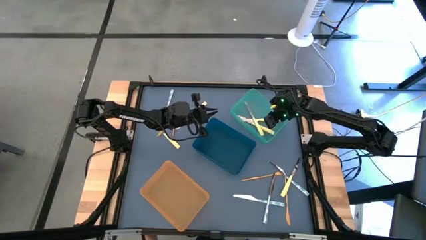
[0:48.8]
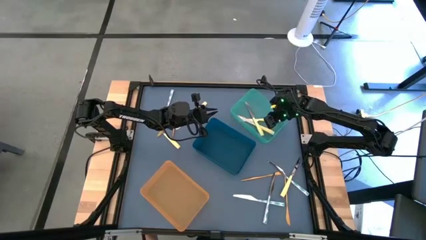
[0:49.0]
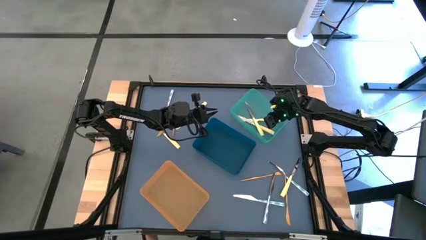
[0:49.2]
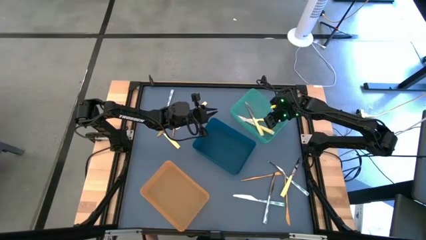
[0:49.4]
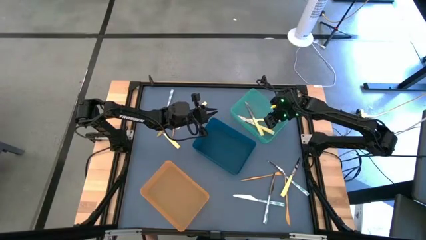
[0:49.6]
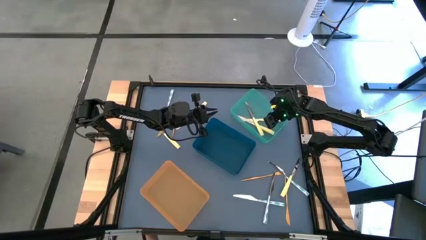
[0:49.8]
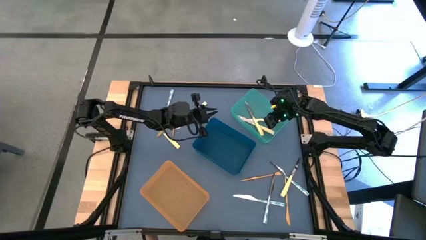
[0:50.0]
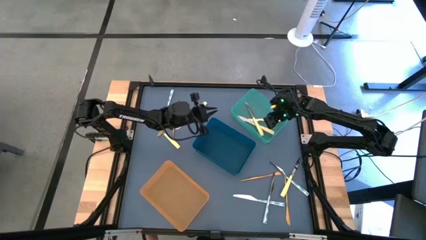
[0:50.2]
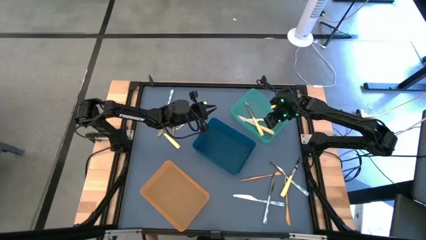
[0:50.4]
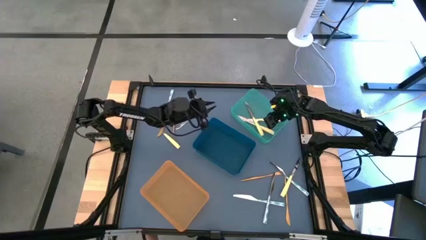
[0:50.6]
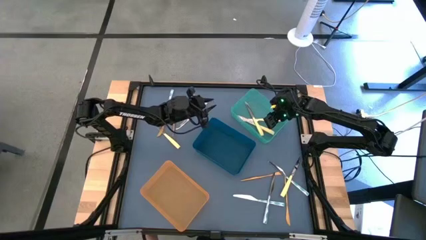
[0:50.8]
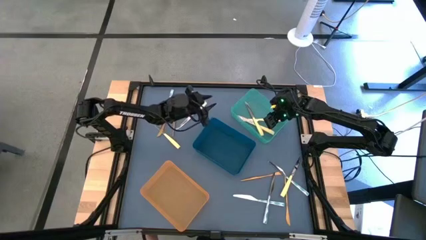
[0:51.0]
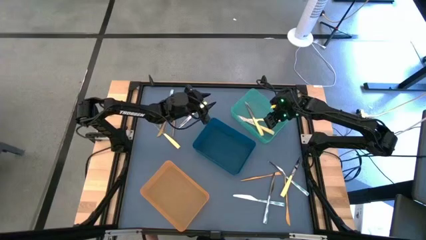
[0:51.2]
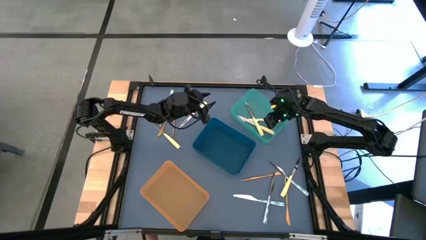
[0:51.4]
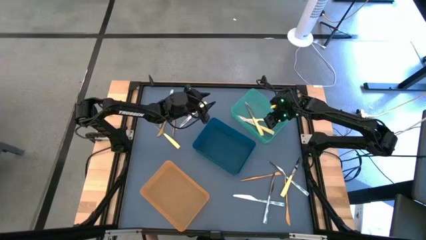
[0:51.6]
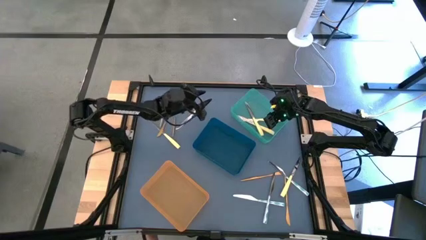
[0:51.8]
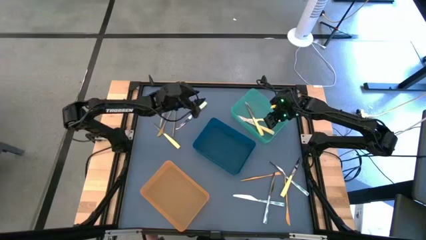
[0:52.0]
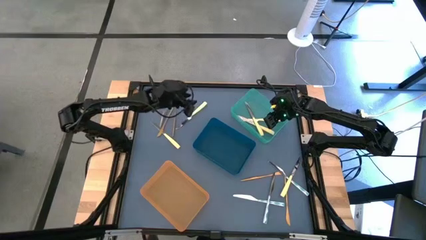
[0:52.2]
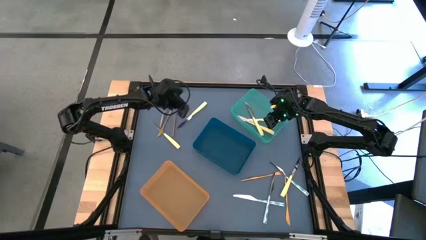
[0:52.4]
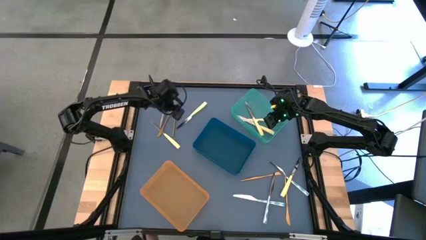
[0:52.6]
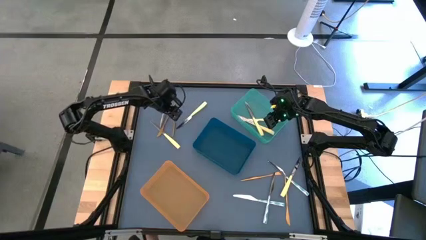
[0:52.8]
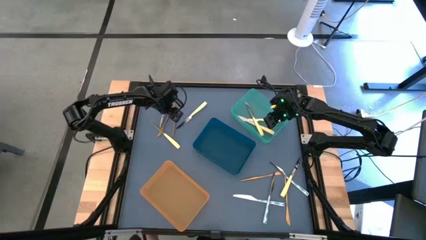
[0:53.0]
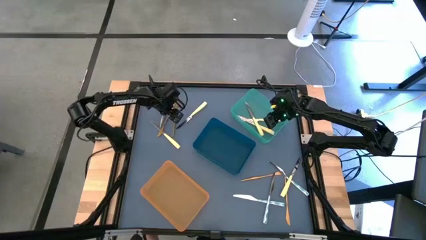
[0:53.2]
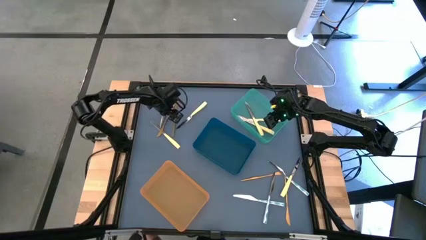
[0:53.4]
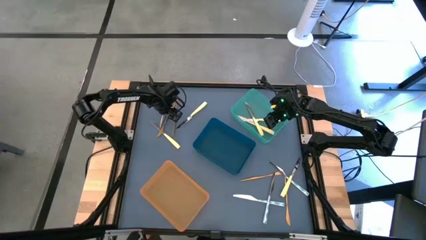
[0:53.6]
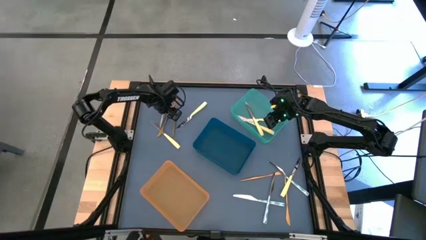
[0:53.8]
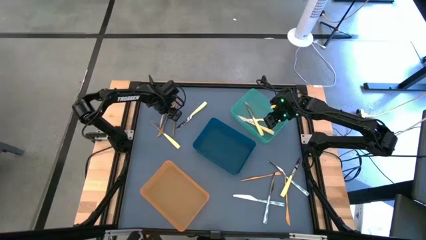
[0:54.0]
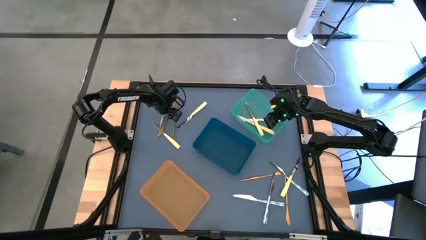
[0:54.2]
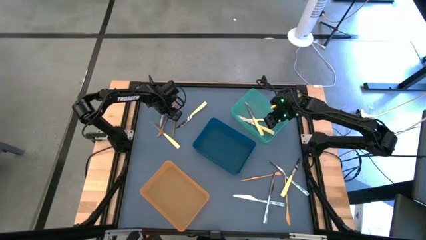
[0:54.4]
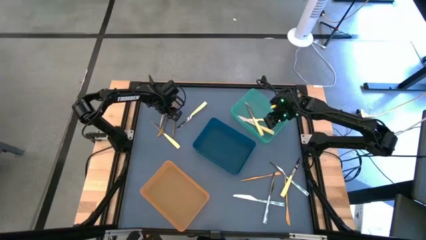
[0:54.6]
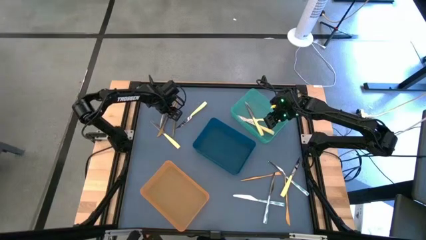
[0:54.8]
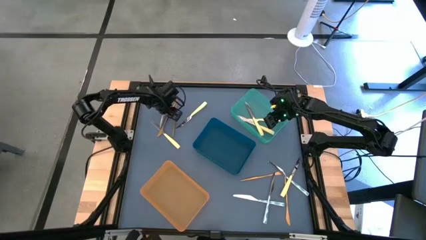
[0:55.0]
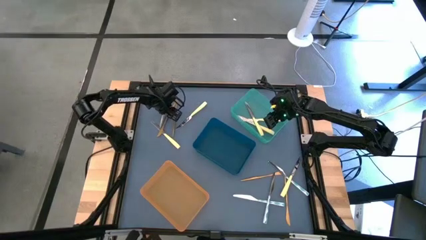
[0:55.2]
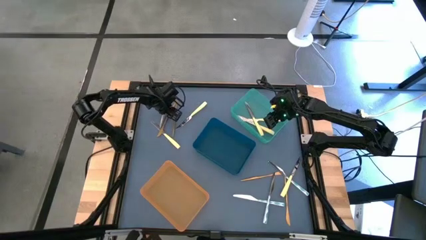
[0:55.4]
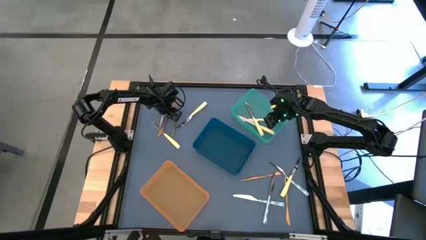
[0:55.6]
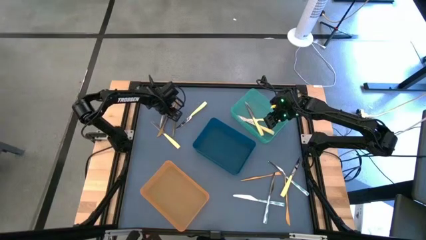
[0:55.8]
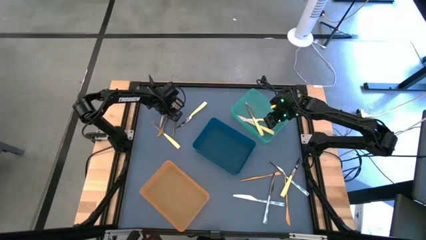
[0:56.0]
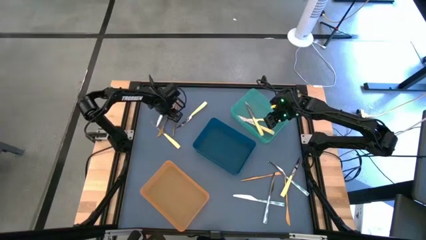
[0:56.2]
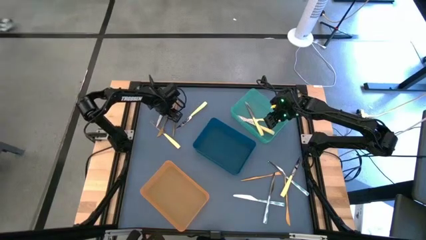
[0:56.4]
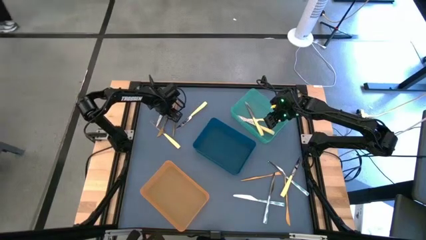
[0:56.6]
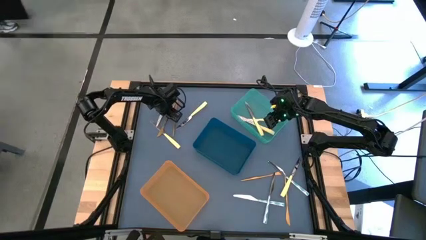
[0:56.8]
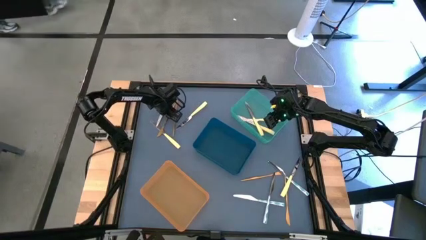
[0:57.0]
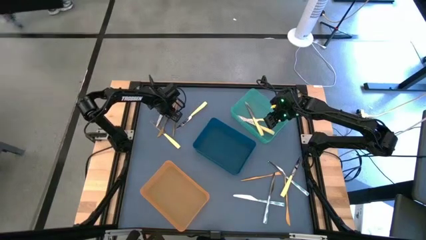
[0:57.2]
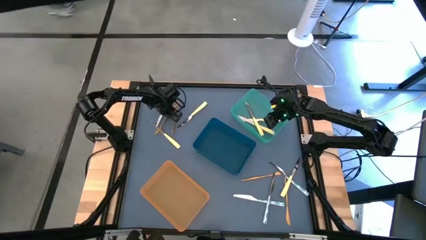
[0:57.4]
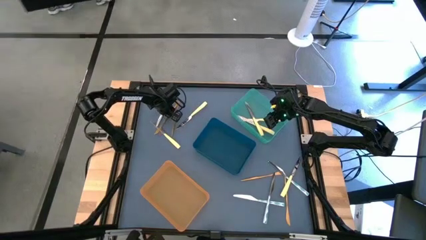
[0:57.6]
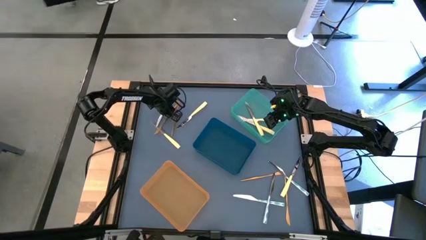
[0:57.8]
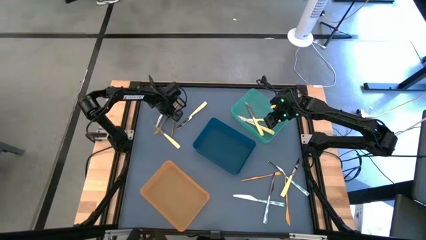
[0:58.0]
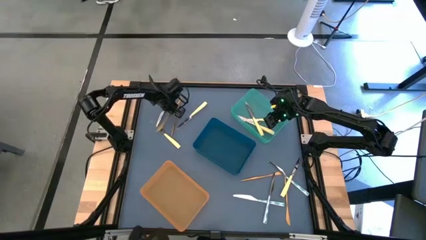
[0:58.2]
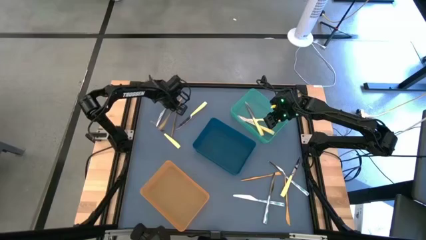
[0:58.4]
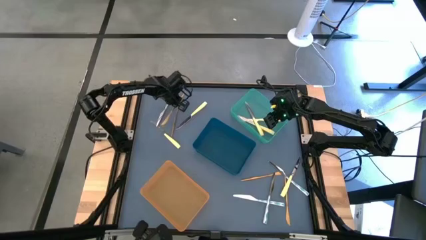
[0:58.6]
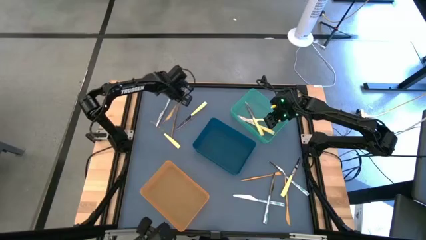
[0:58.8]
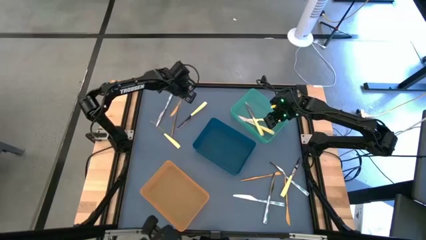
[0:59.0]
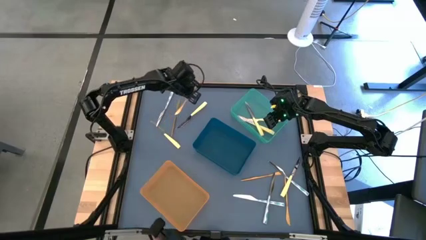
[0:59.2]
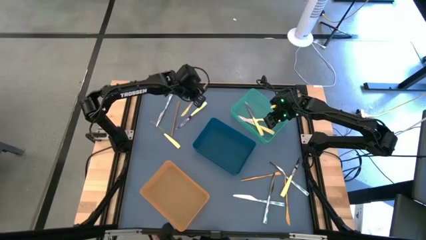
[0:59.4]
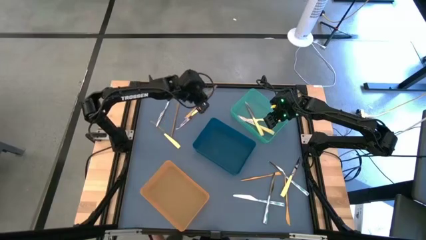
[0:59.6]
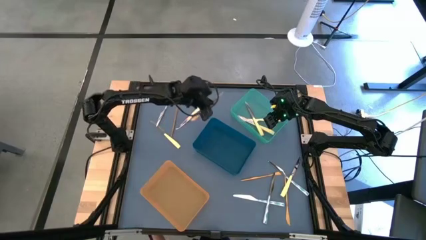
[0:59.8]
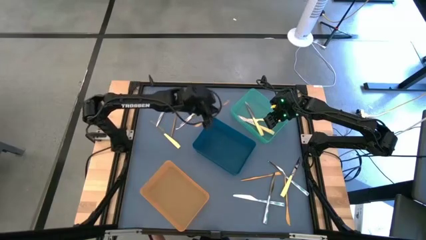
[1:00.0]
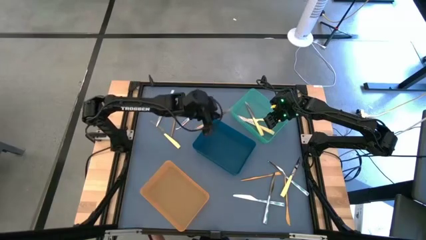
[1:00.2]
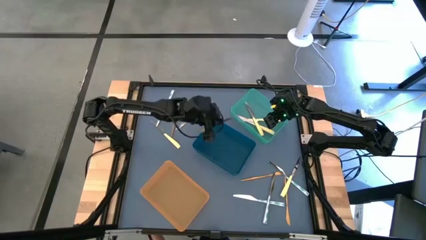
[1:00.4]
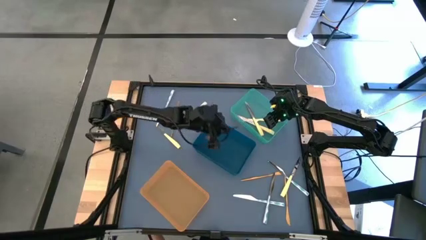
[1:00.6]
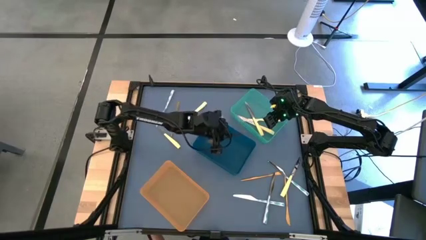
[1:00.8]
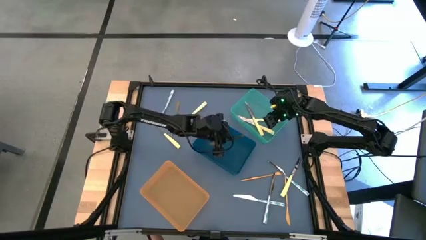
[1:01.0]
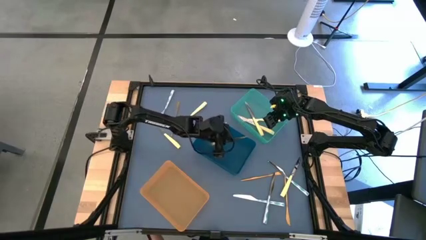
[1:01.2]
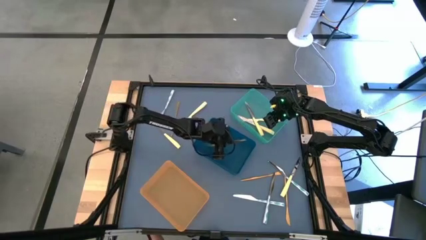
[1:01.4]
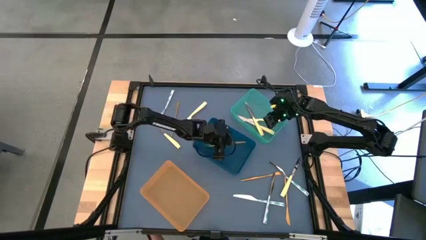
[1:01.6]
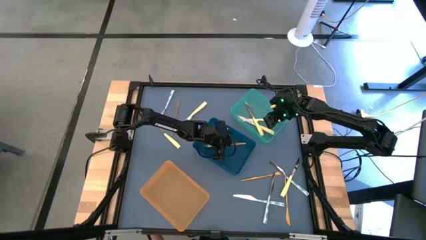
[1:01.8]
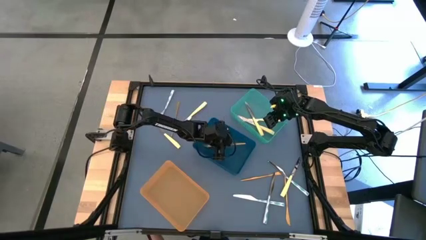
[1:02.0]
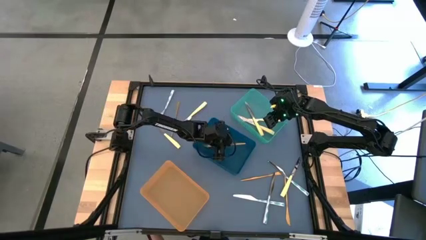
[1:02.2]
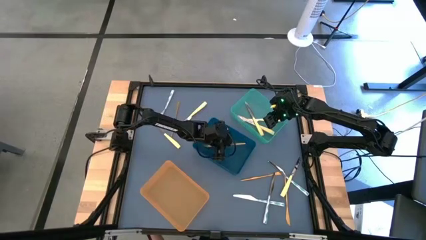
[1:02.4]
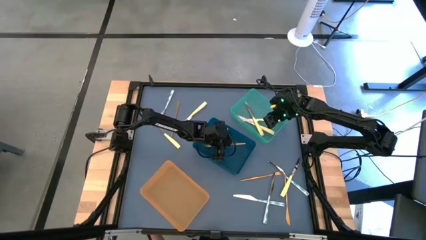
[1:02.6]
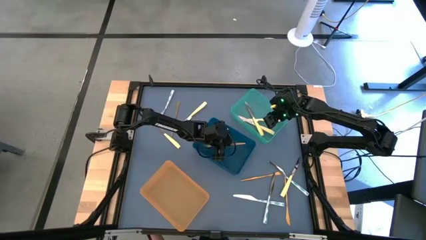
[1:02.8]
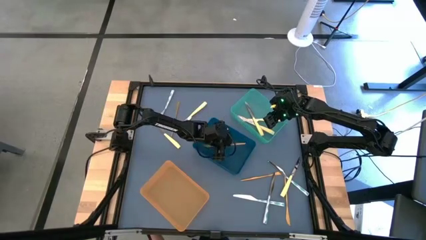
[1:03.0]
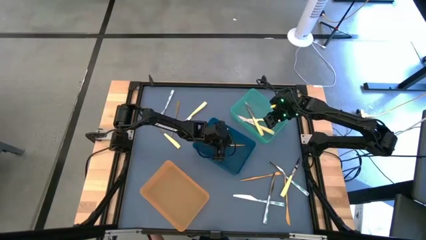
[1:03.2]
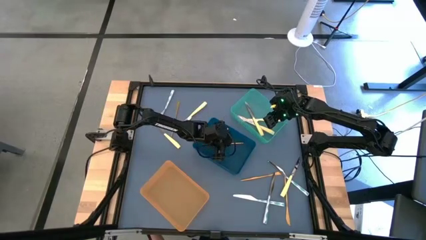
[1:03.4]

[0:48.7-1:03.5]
Task: Sort silverware by color (type)
Put the right gold knife into the dark blue bin

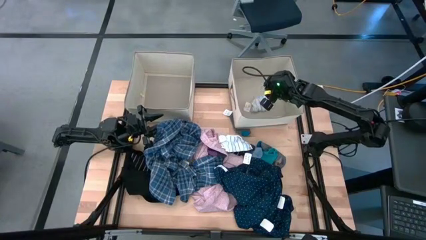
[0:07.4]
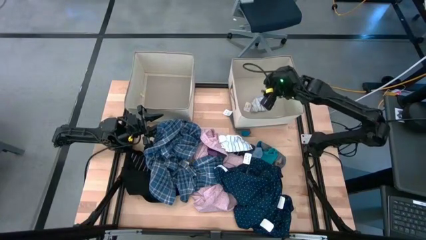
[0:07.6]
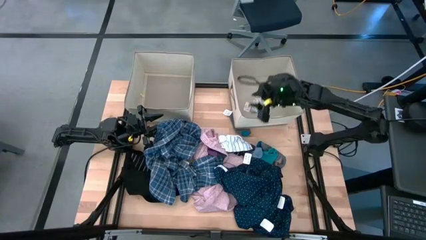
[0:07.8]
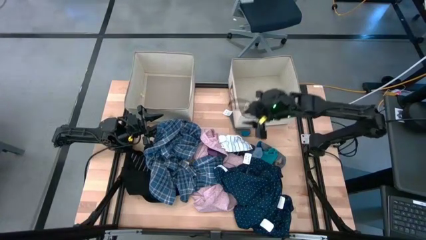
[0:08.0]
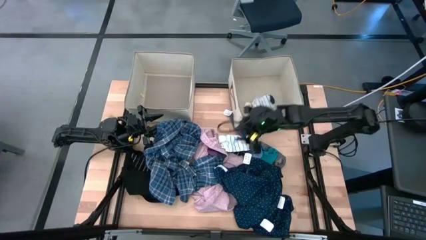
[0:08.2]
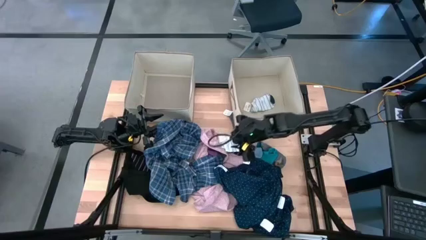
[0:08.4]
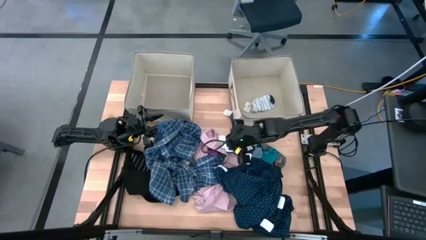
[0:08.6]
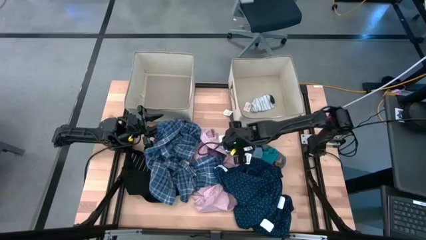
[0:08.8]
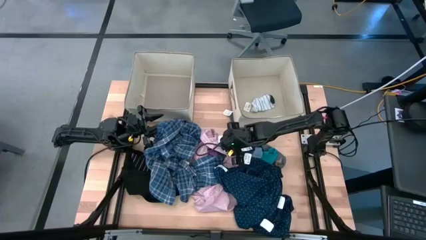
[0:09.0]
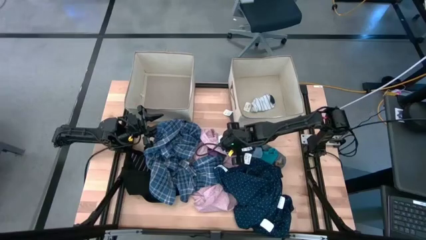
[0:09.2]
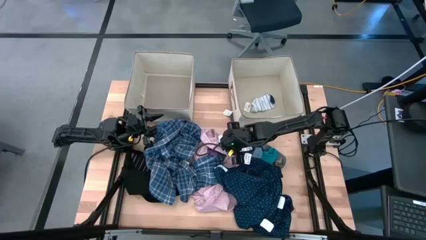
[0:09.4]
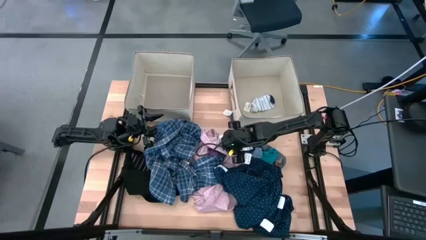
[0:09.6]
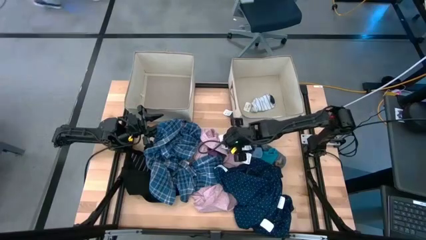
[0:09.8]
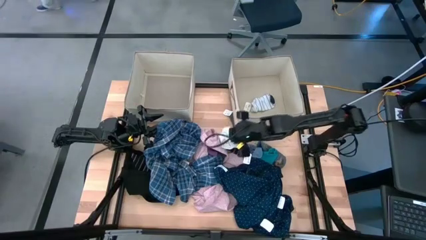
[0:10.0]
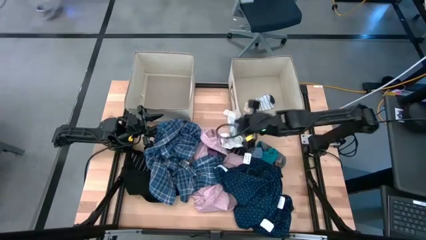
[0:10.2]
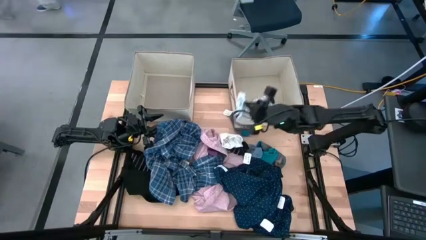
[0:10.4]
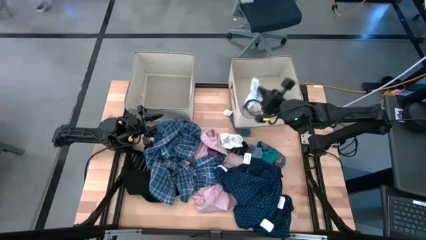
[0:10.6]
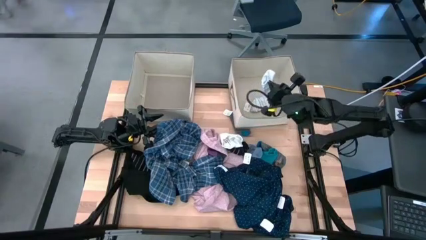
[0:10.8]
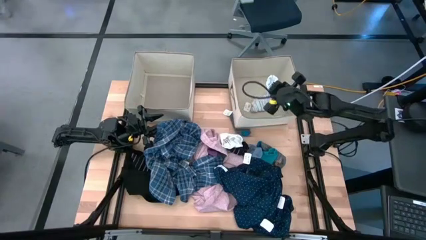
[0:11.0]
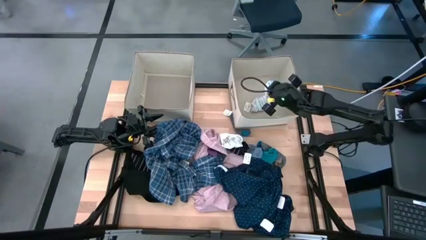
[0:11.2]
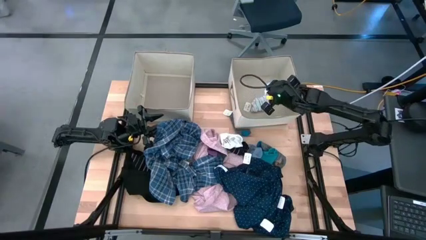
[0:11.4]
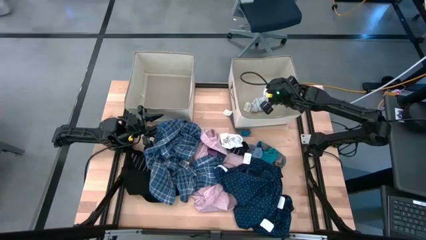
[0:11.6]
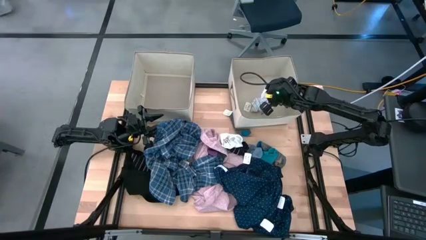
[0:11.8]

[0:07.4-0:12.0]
Task: Sort clothes
Put the white stripe sock into the right brown laundry organizer
